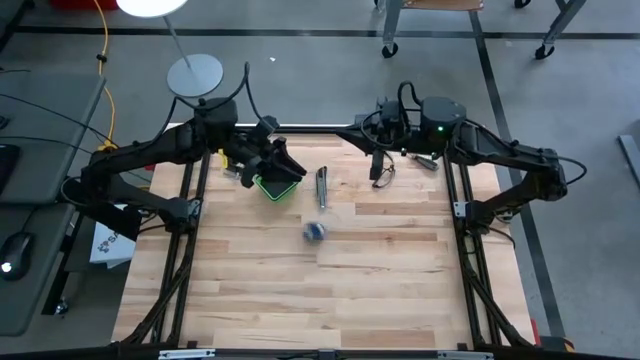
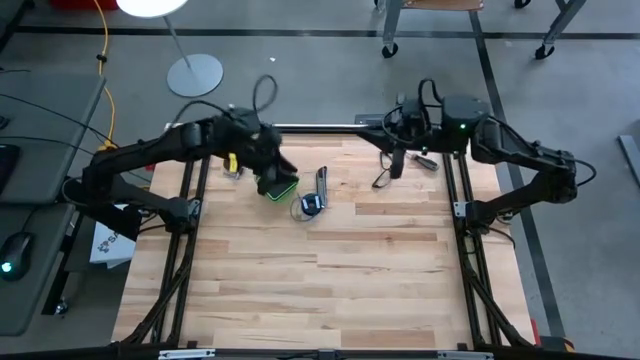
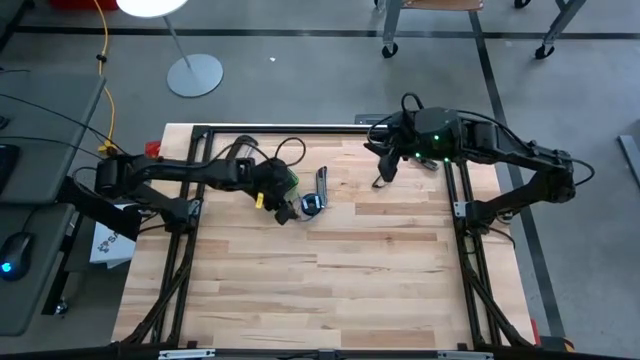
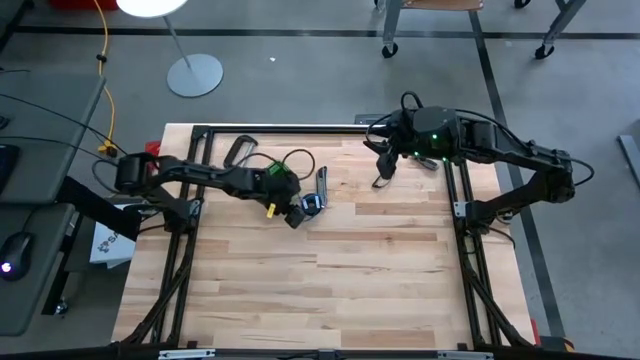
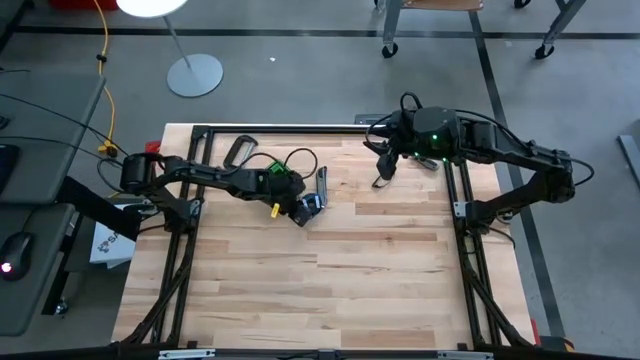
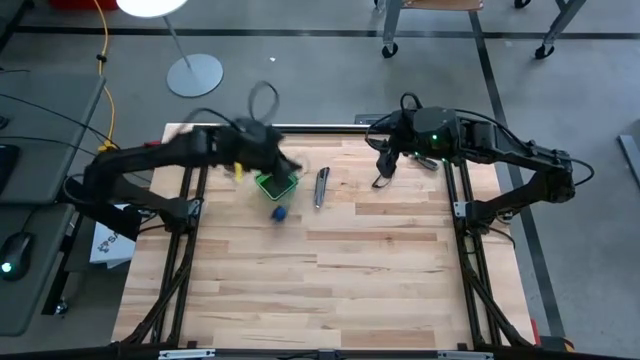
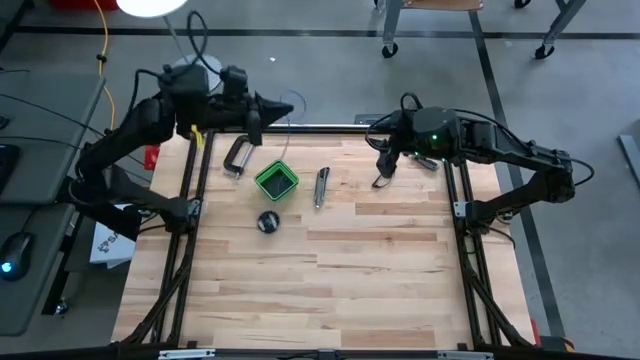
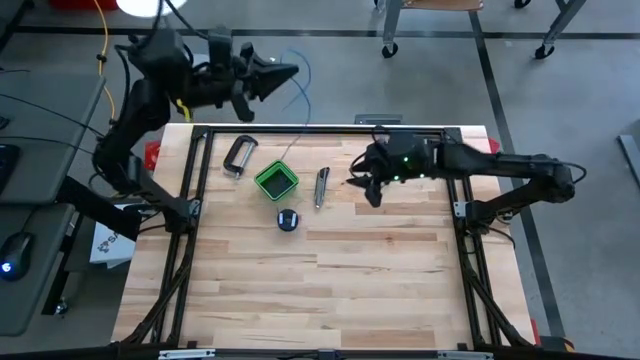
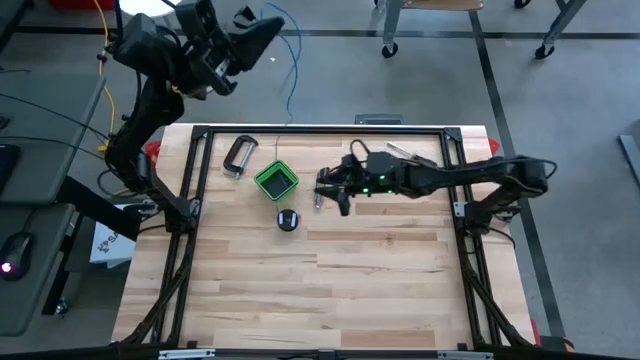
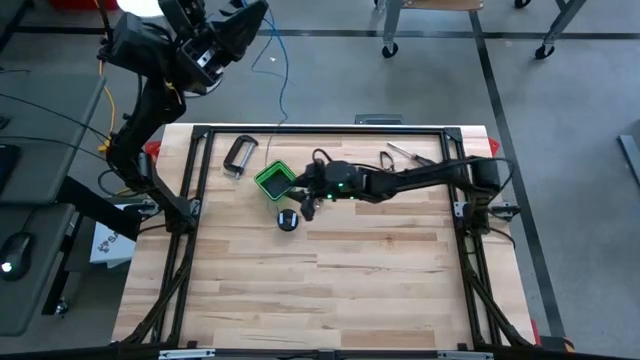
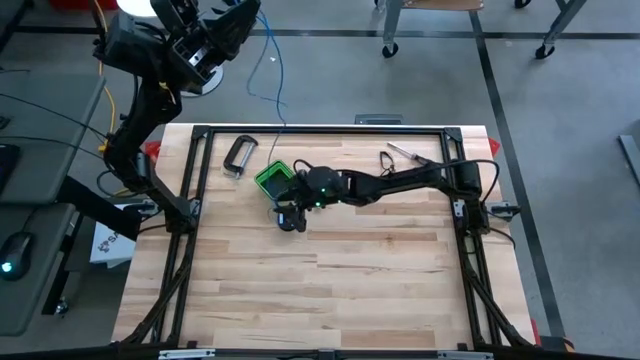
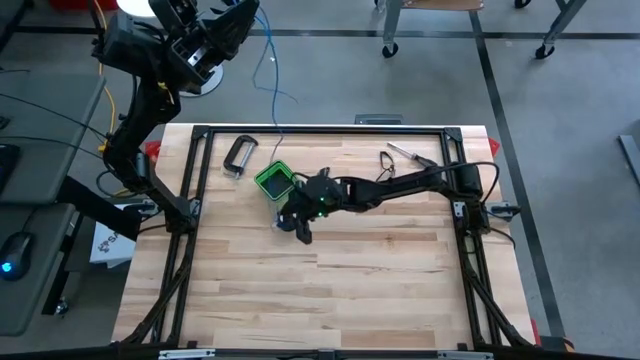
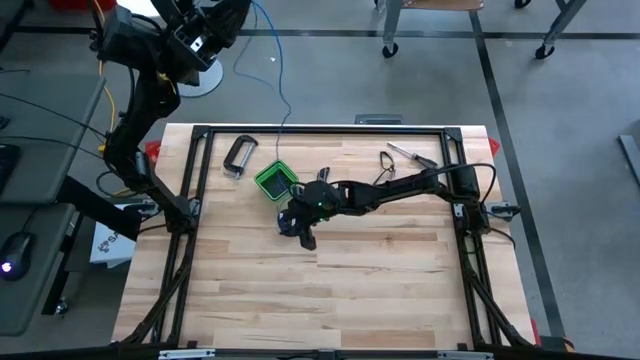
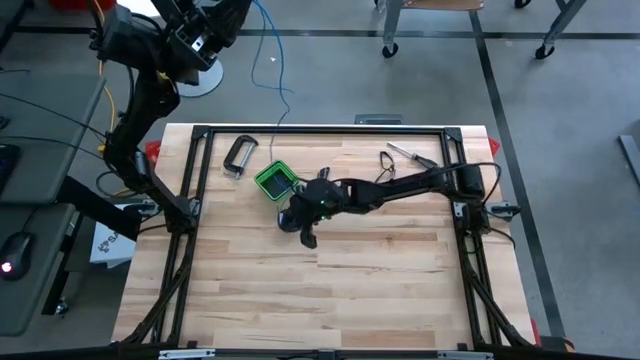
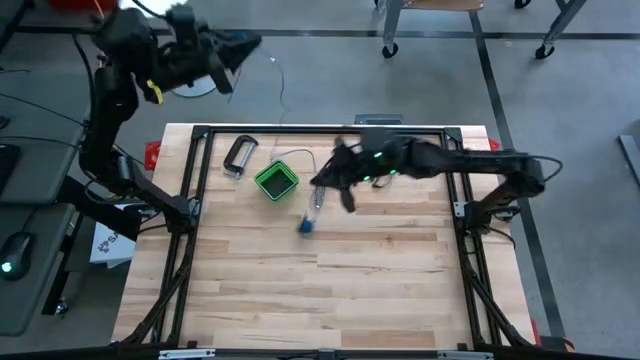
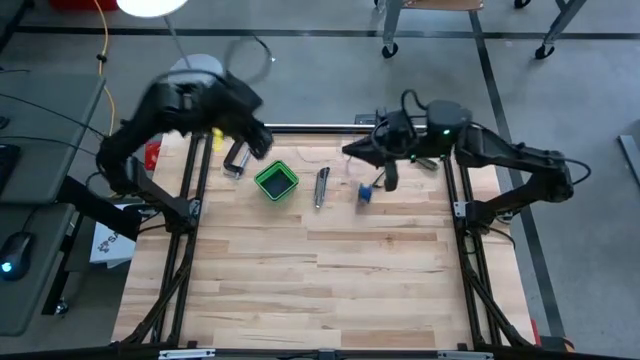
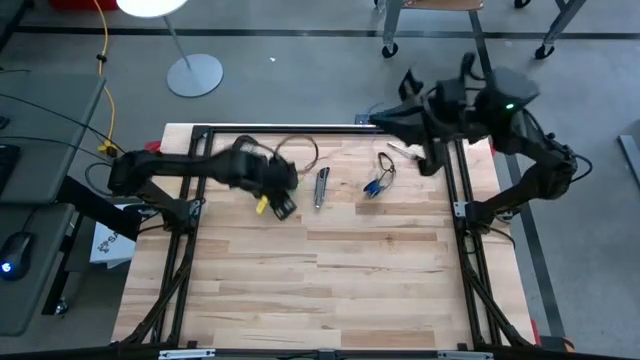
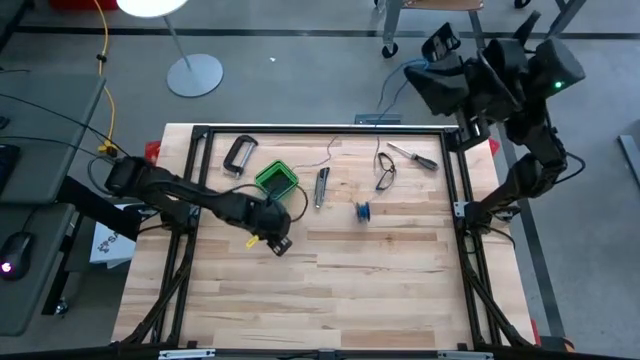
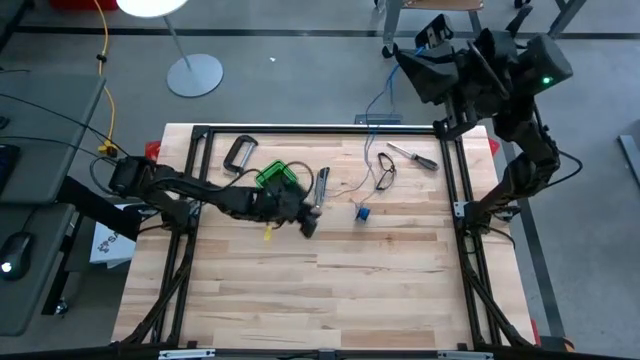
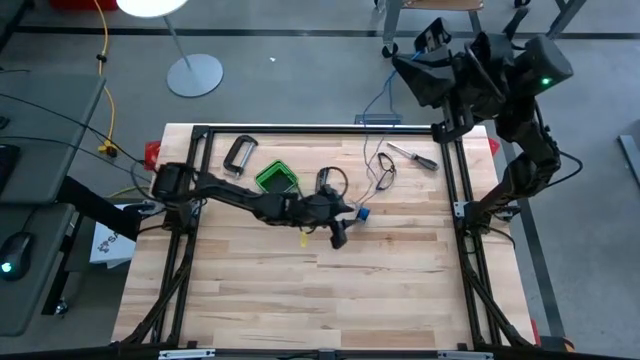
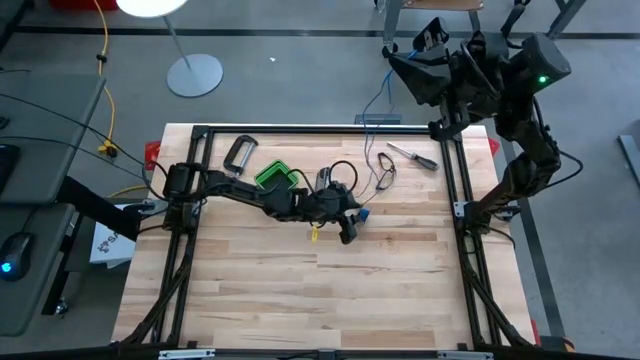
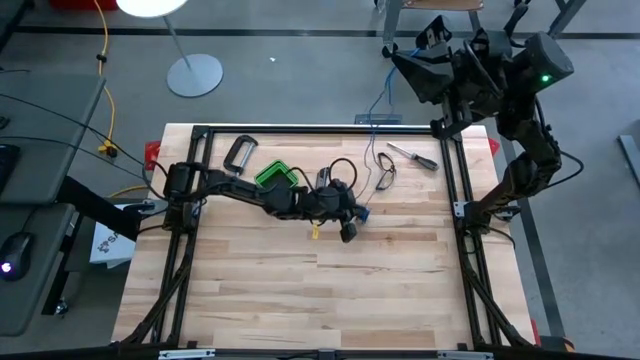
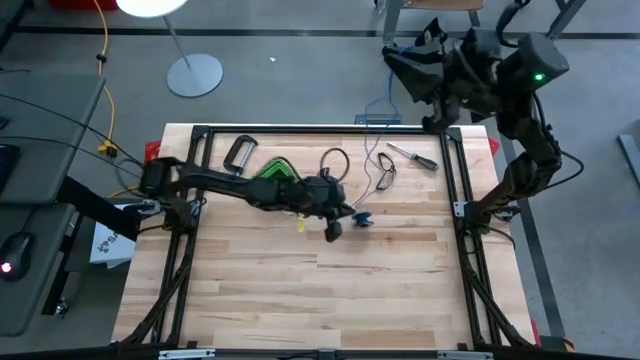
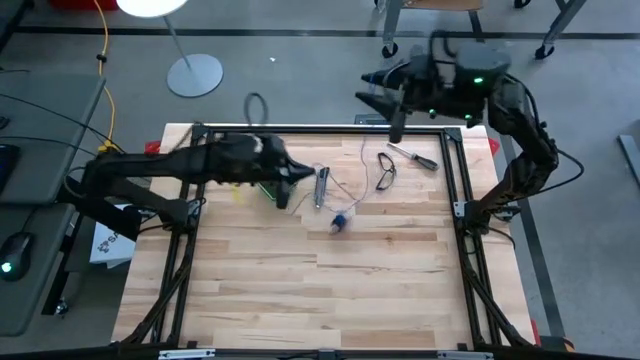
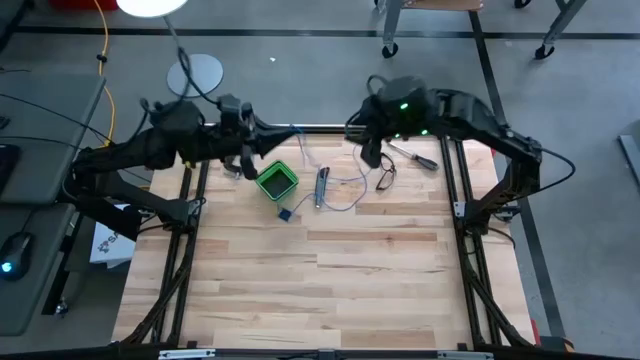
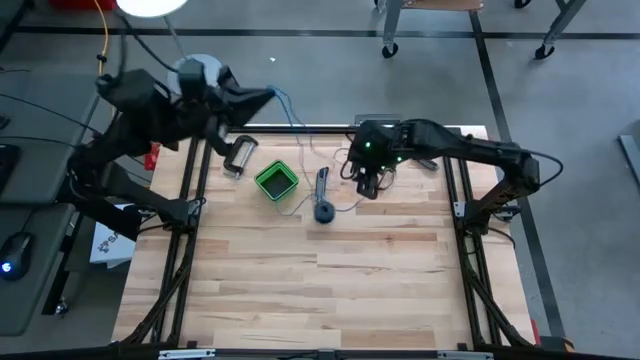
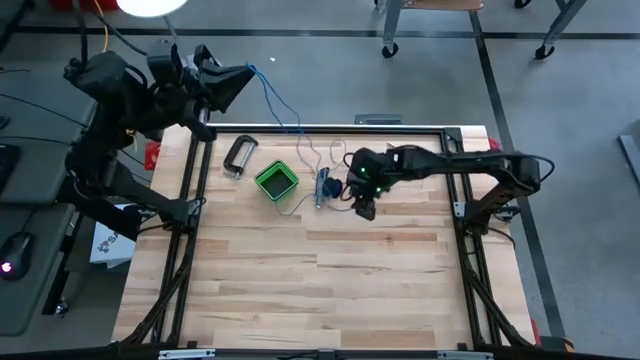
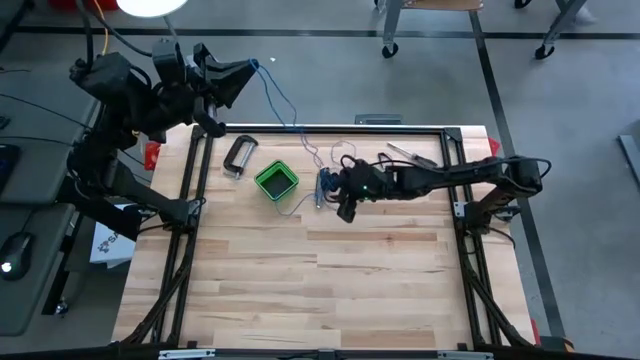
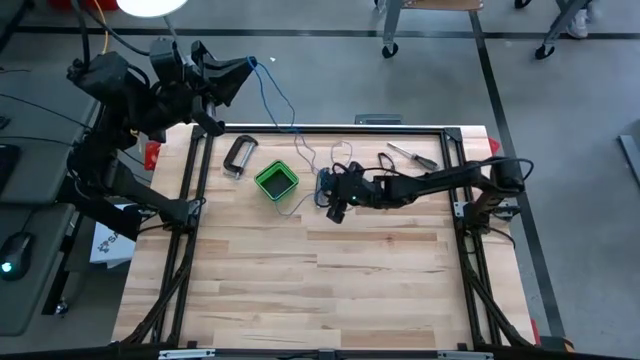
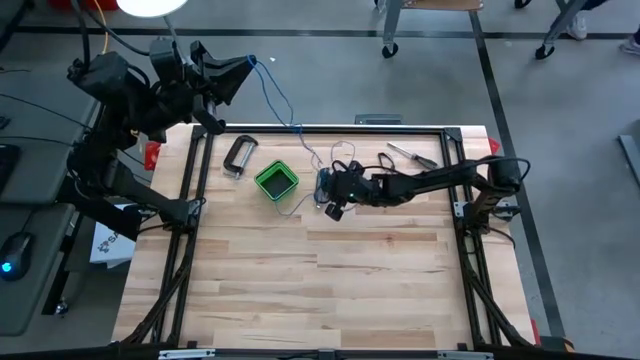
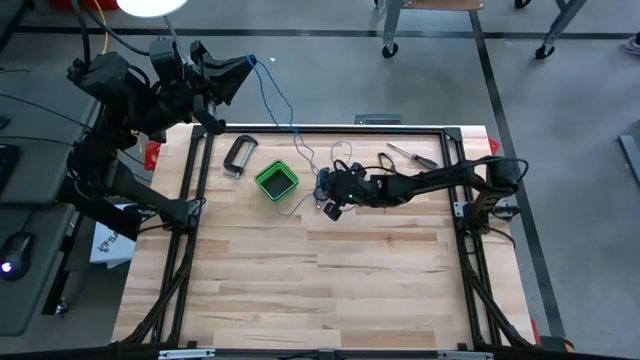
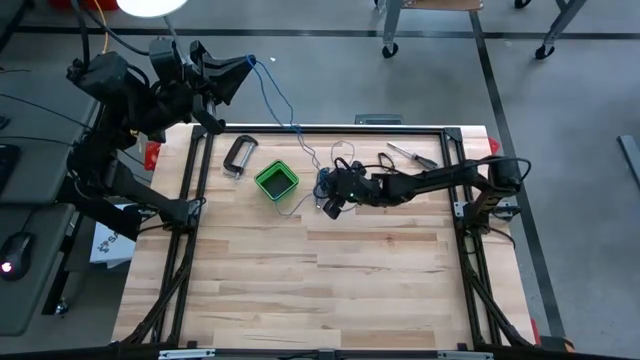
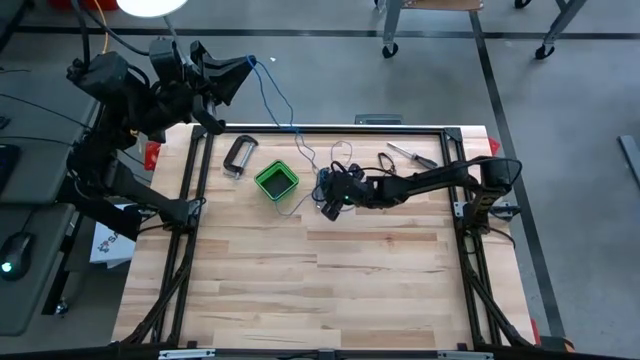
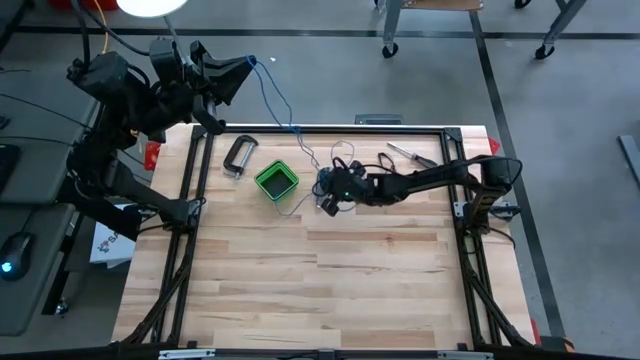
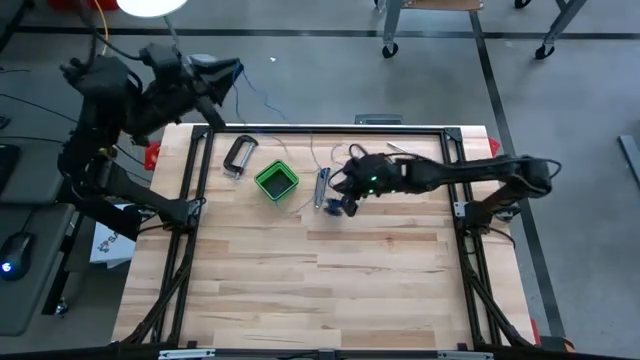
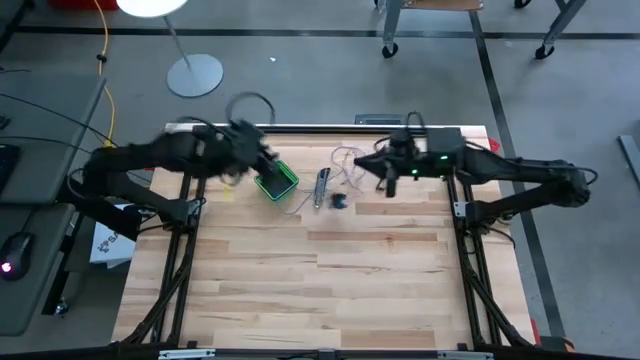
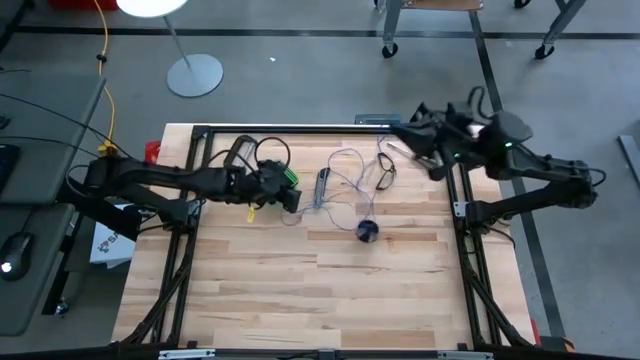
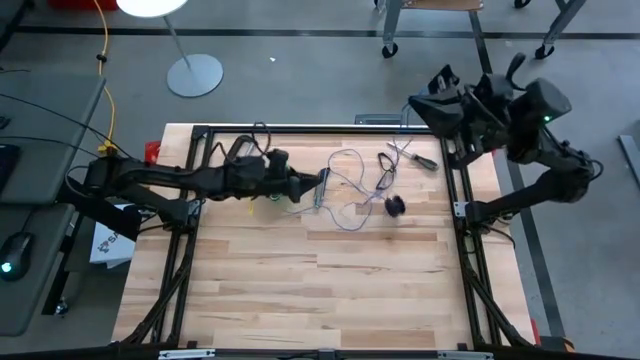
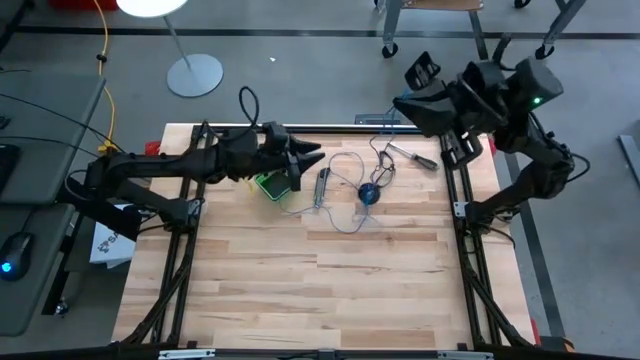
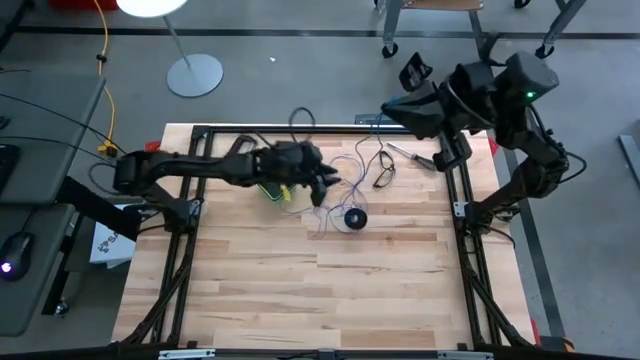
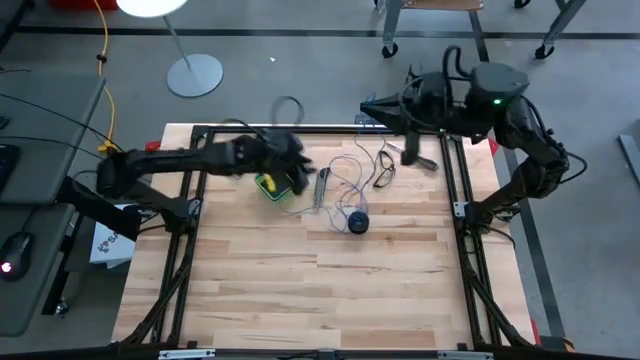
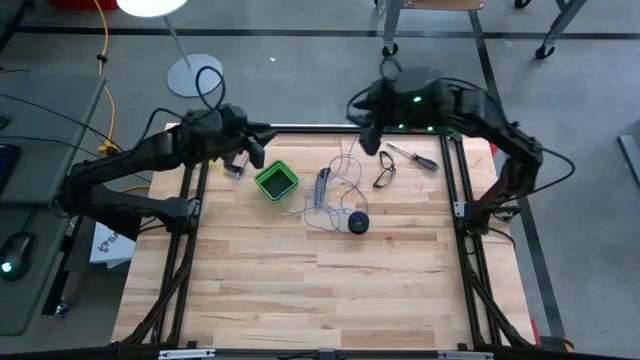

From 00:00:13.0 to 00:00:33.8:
Task: Coil cords
Uncoil the blue wire from the spool

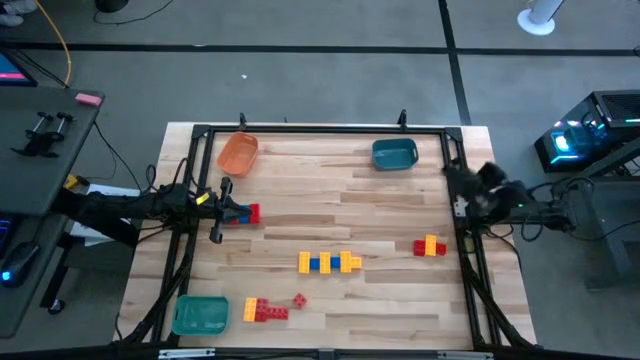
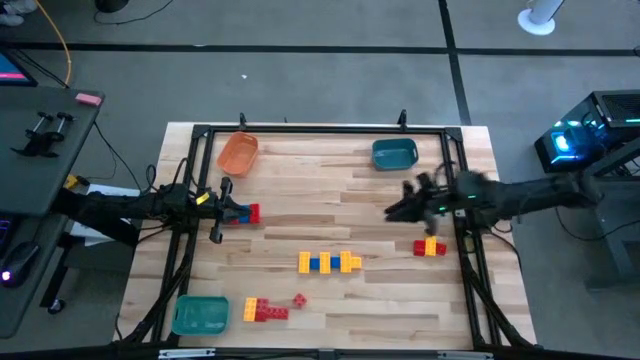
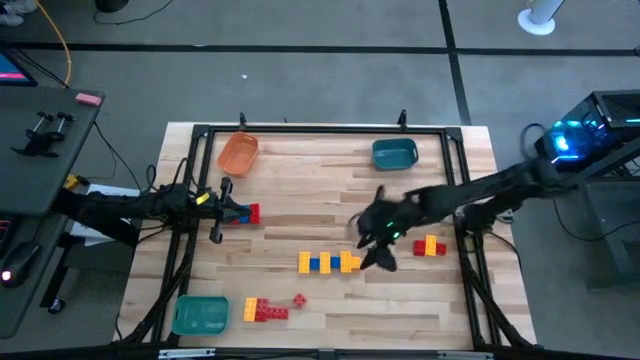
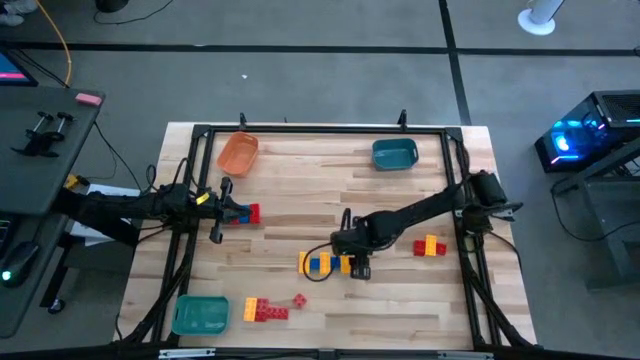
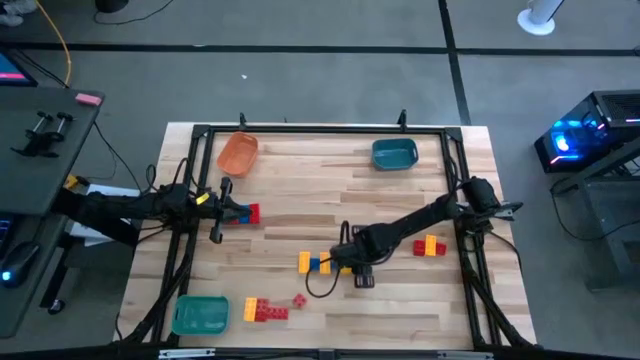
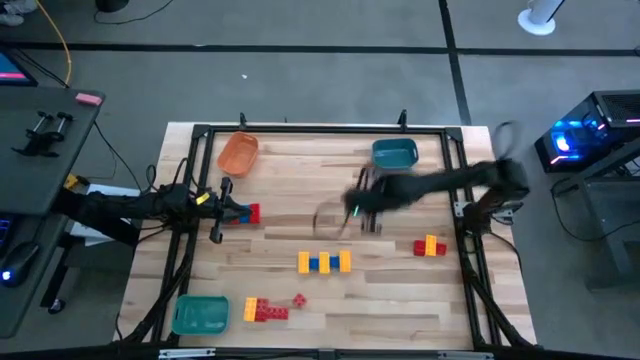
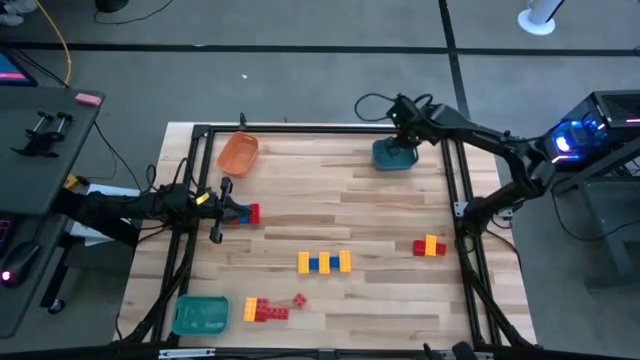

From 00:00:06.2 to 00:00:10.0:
Task: Sort blocks
Put the yellow game piece into the blue bin
